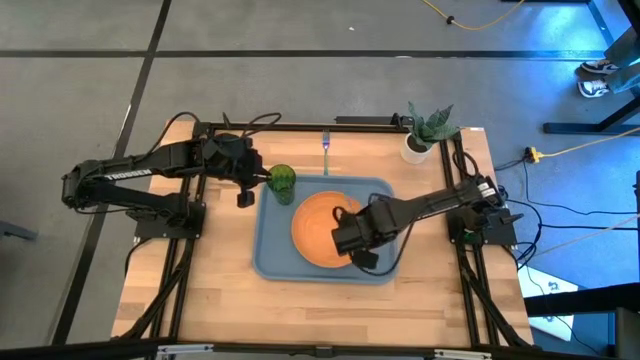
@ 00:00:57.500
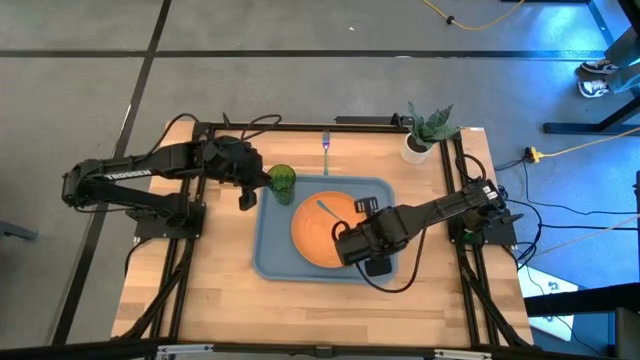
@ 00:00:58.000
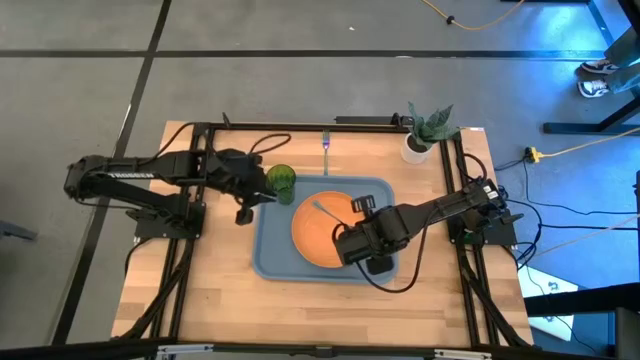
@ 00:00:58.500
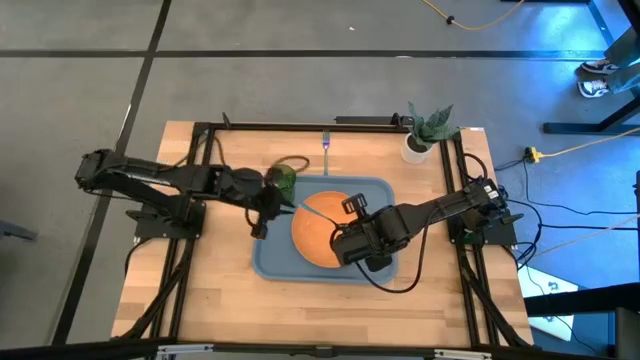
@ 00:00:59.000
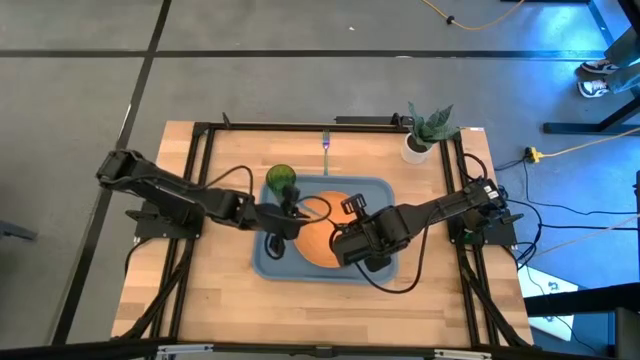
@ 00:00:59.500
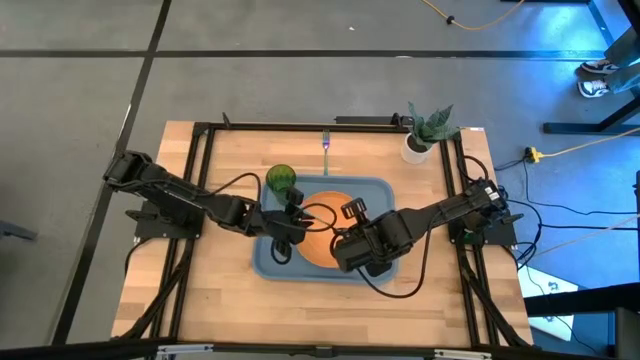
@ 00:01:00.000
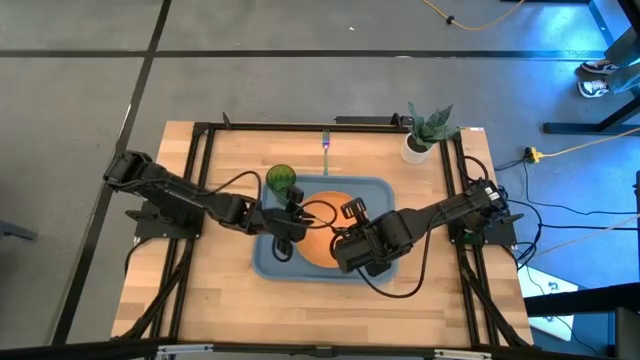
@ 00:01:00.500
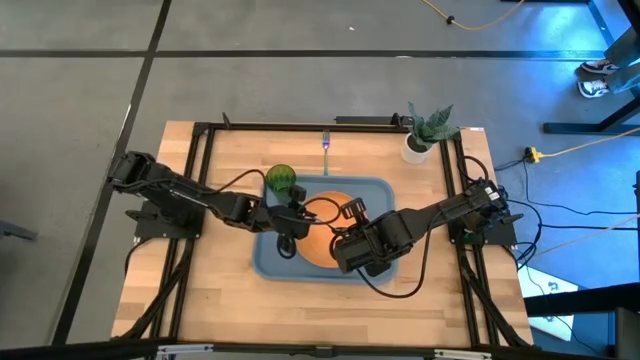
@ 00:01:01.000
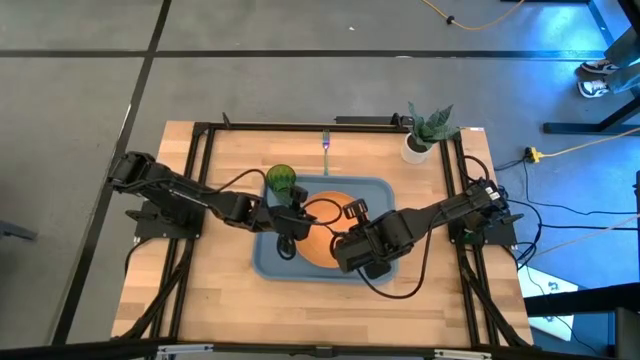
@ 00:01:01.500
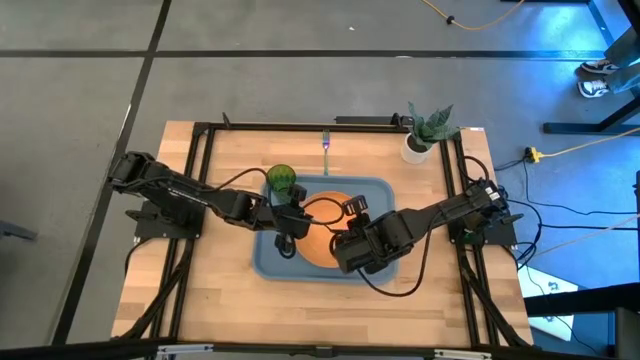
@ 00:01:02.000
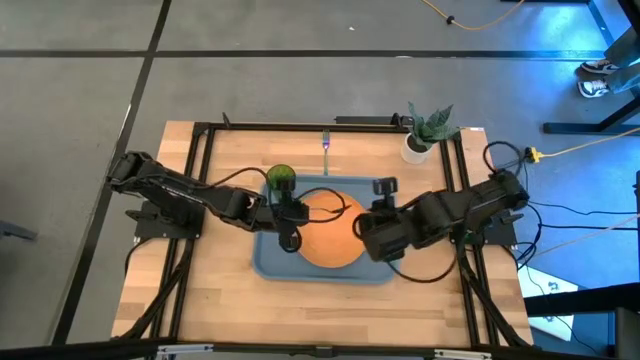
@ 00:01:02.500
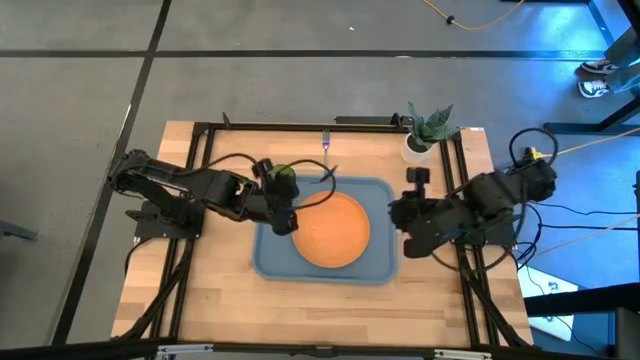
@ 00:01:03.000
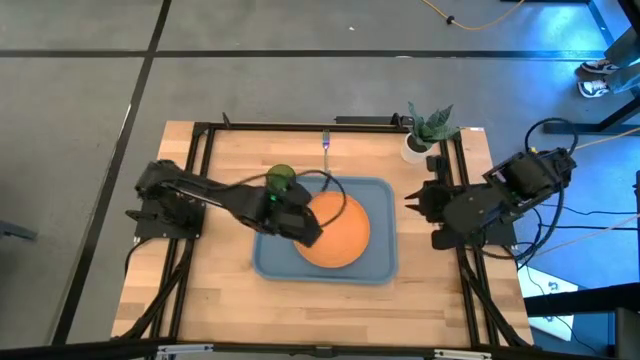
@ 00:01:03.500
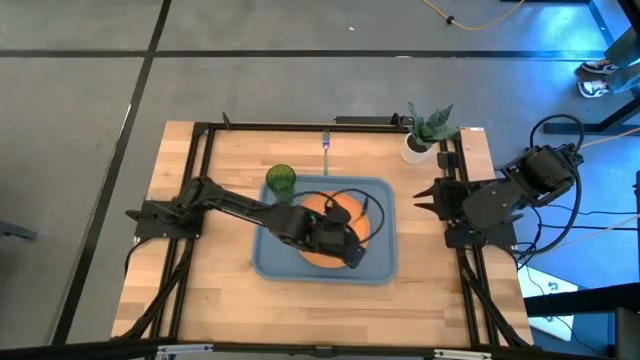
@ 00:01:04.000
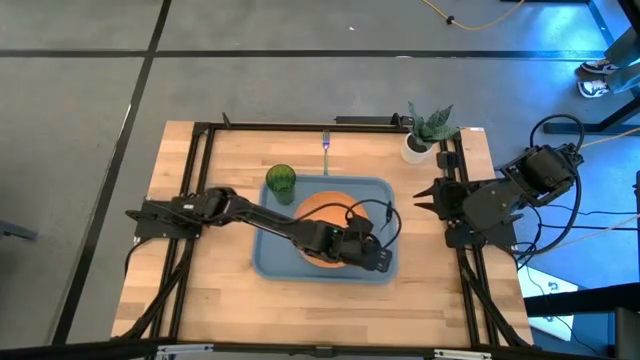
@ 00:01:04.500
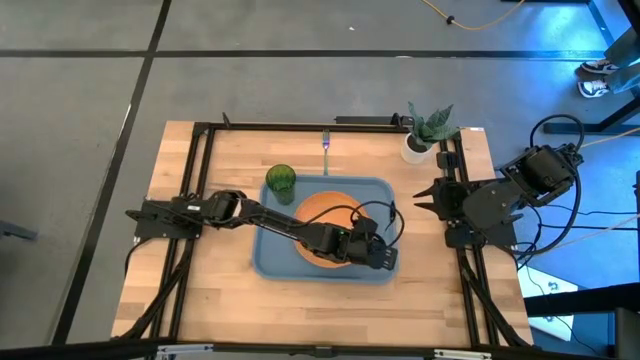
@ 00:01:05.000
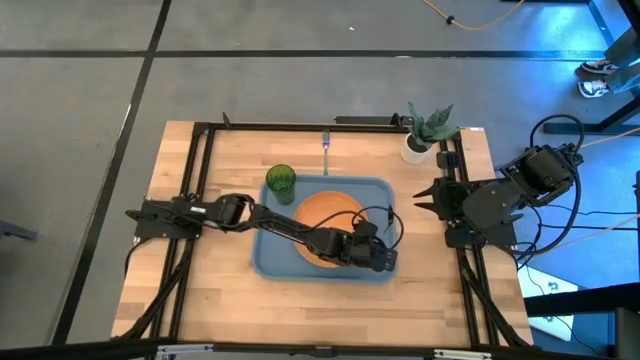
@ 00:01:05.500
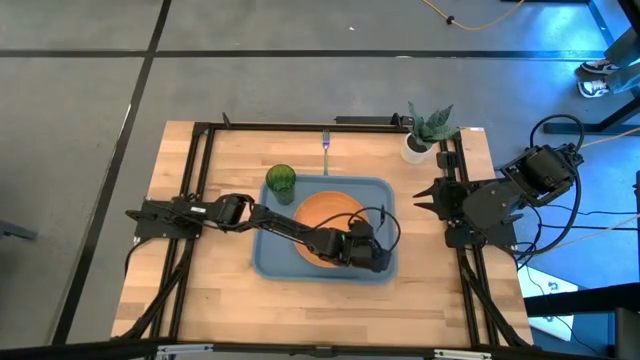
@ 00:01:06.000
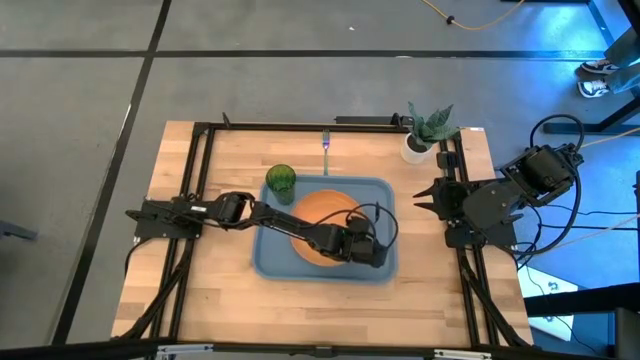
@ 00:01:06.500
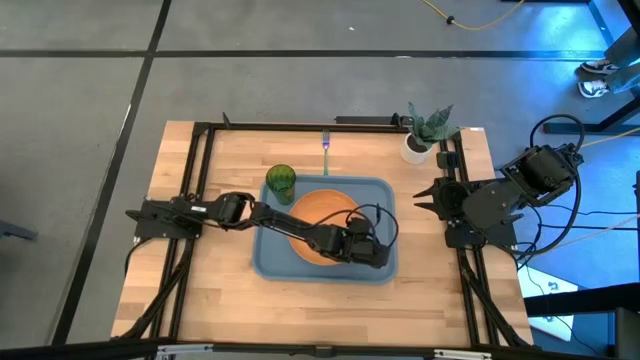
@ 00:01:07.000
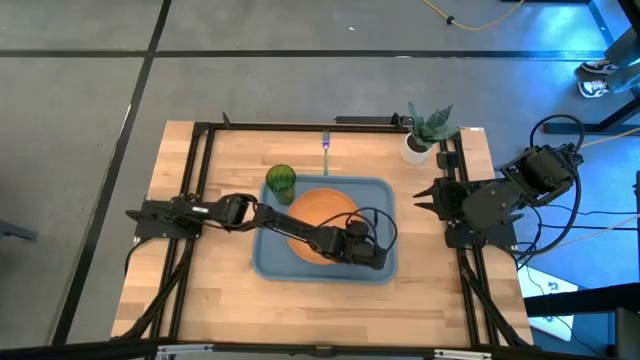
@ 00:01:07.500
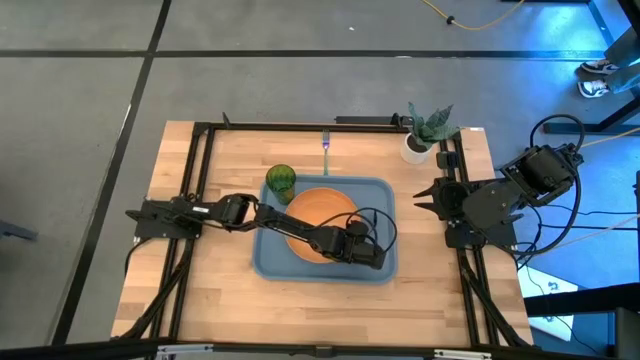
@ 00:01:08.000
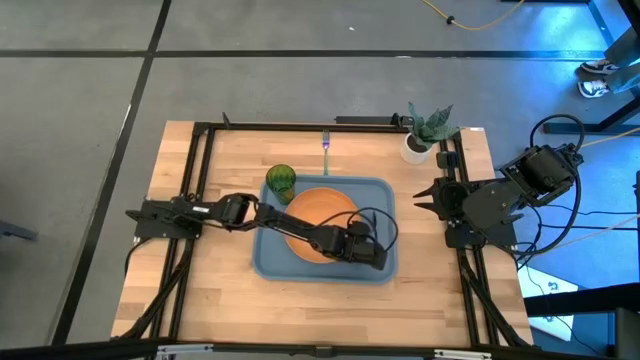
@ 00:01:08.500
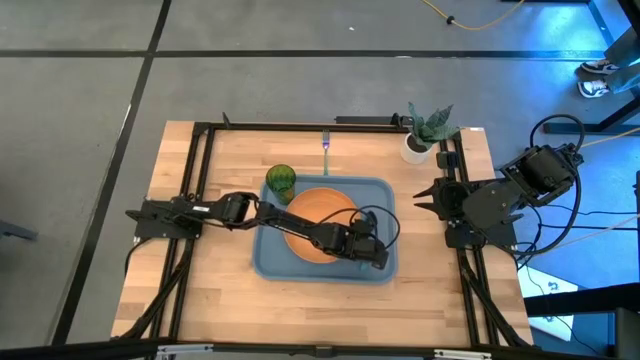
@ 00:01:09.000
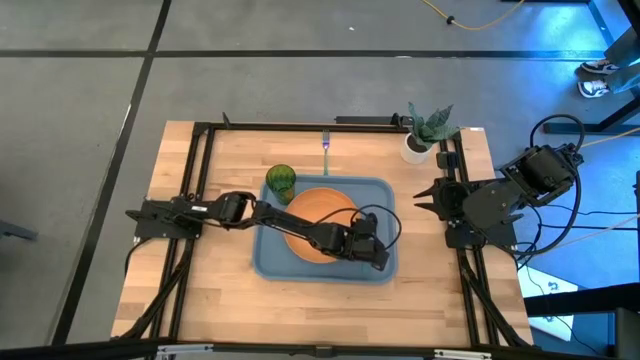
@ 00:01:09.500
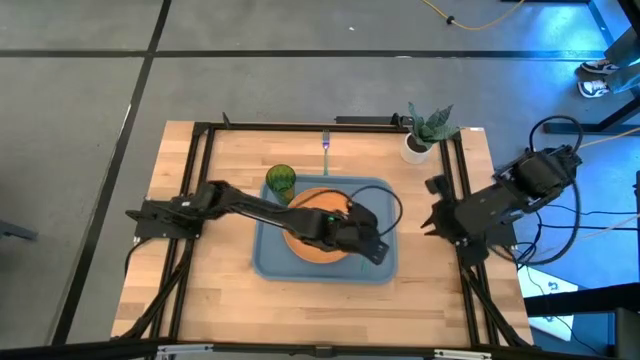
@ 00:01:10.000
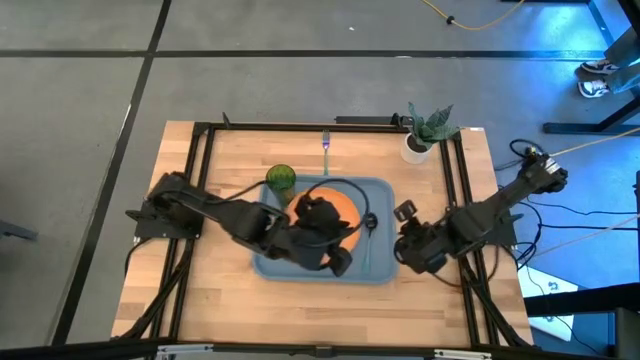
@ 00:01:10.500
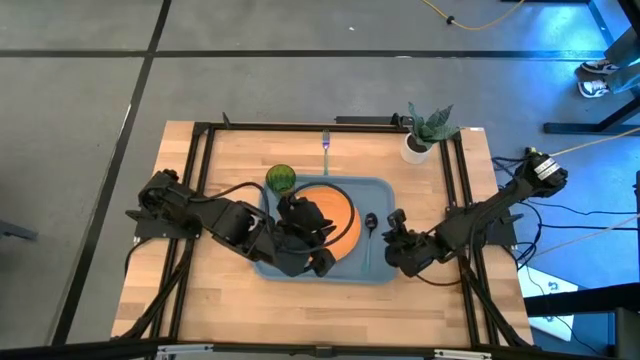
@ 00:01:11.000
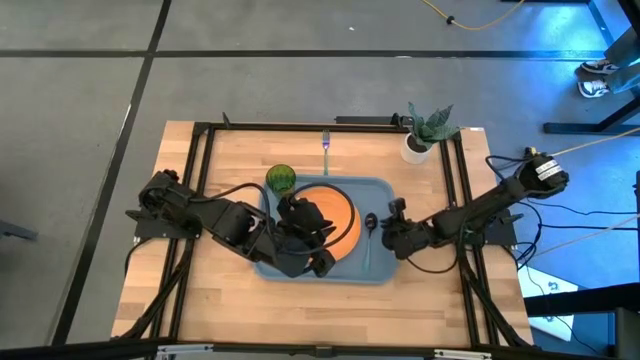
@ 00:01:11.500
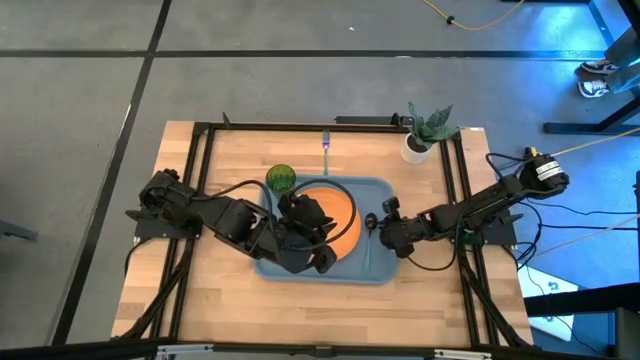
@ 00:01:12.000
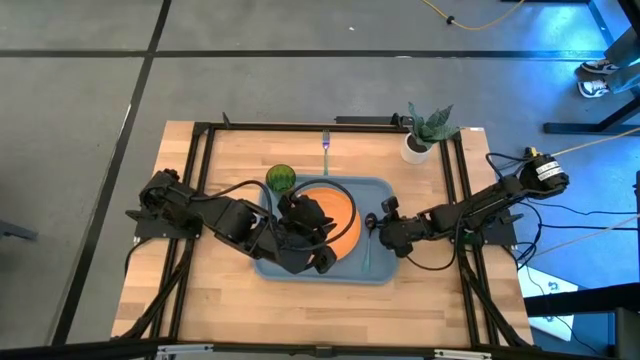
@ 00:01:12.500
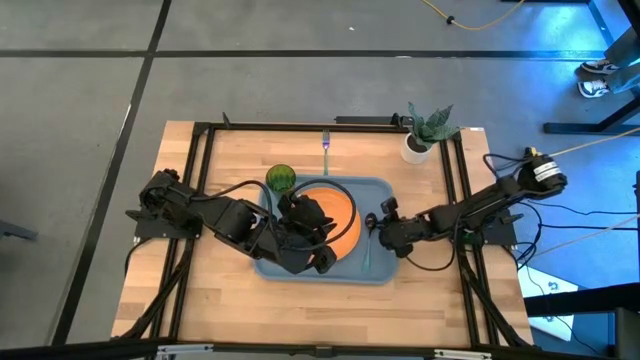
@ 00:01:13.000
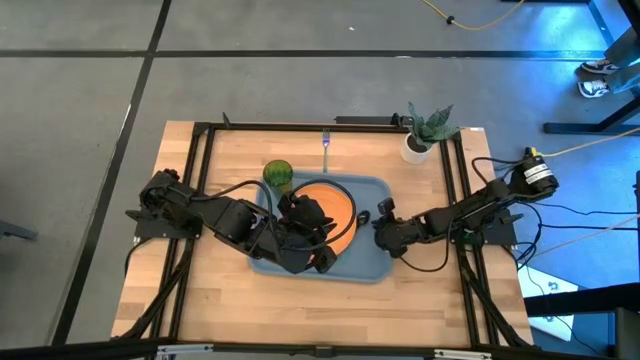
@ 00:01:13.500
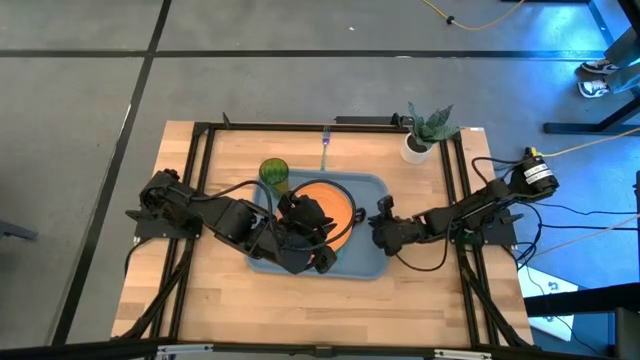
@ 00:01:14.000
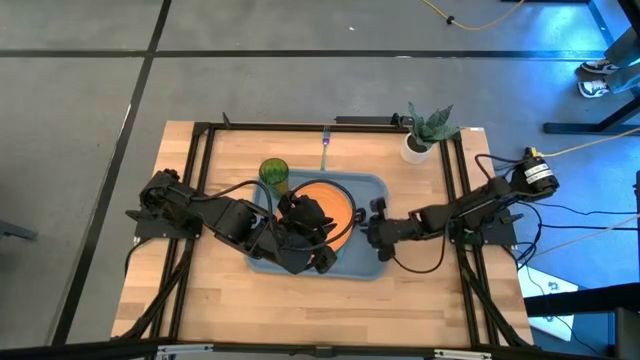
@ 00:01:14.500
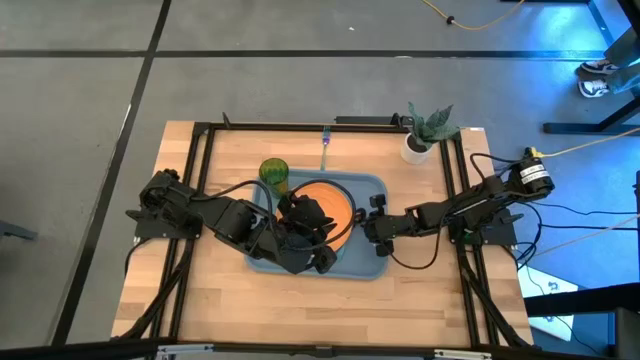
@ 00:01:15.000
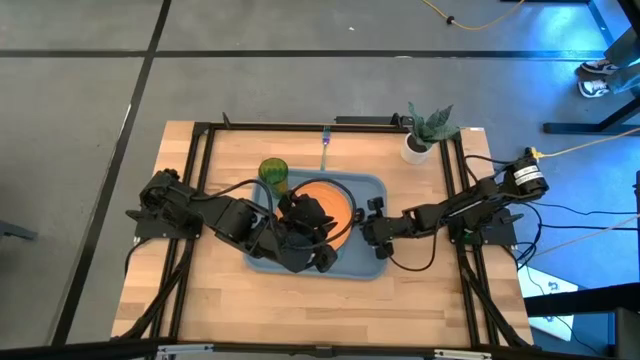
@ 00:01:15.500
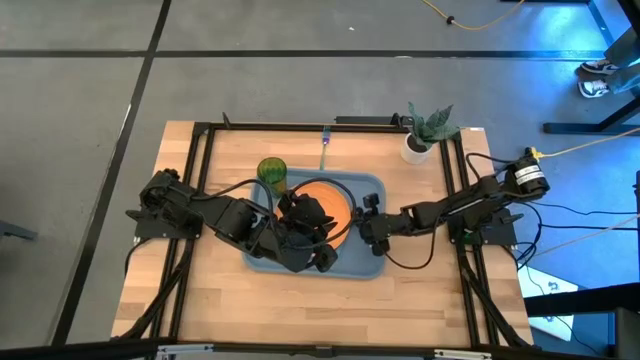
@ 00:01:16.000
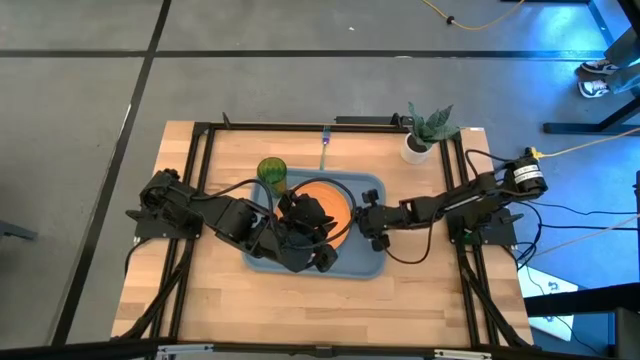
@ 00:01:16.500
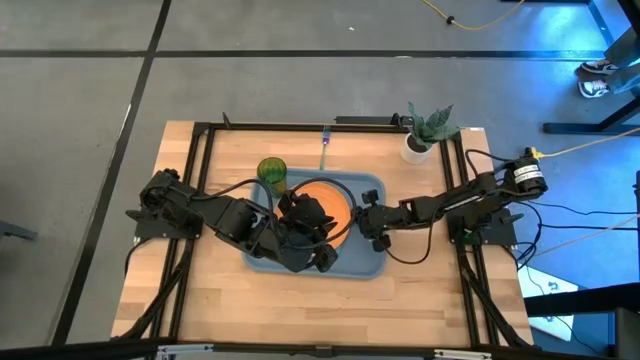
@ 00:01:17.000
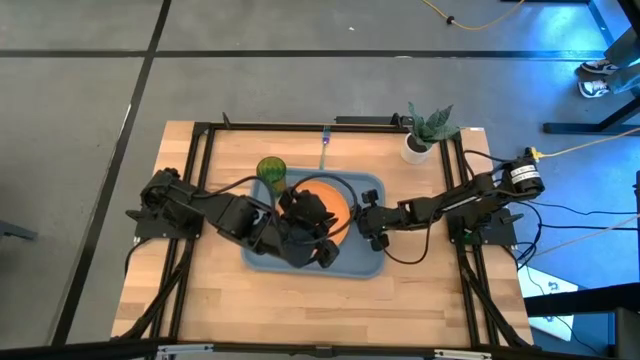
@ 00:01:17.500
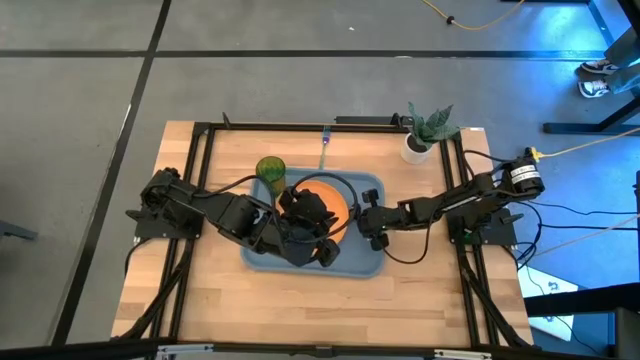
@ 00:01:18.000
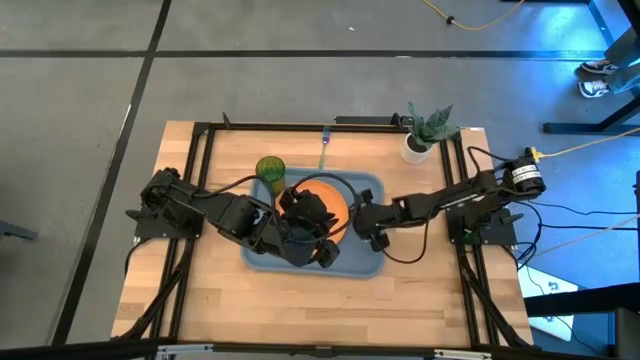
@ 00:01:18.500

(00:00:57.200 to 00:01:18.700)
Task: Pick and place plate/cup/fork/spoon on tray
Put the blue spoon on the blue tray to the right of the orange plate
